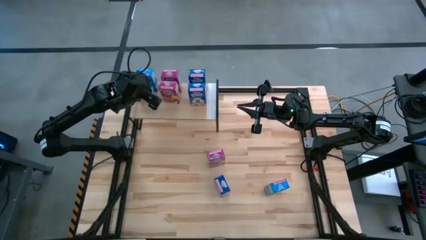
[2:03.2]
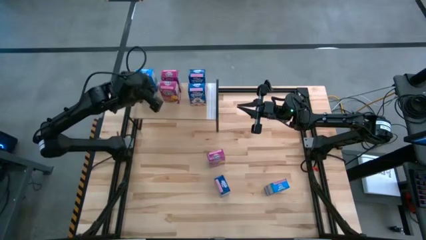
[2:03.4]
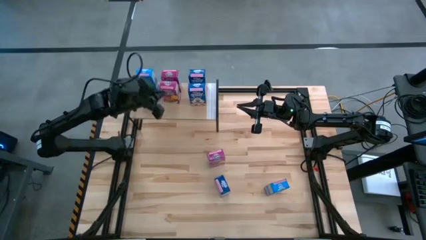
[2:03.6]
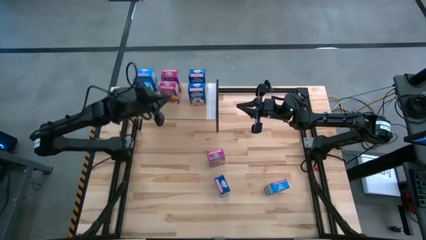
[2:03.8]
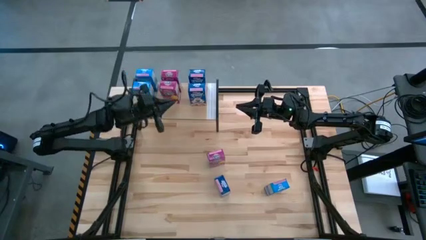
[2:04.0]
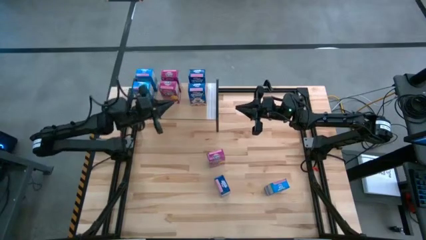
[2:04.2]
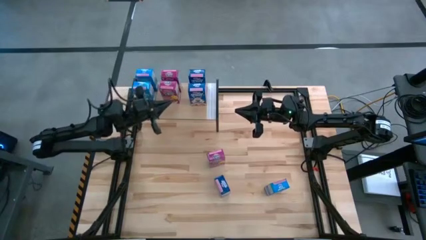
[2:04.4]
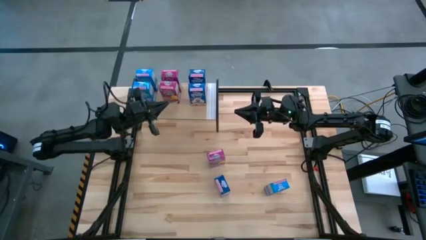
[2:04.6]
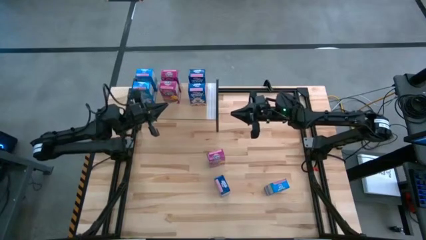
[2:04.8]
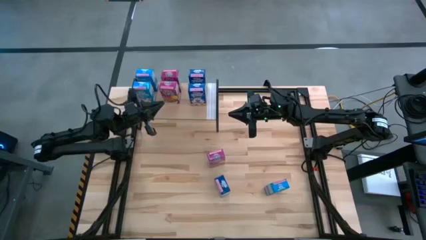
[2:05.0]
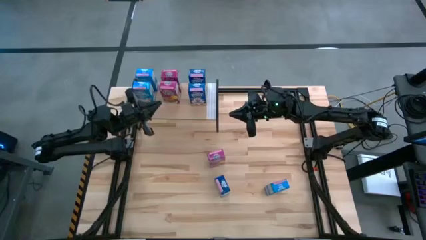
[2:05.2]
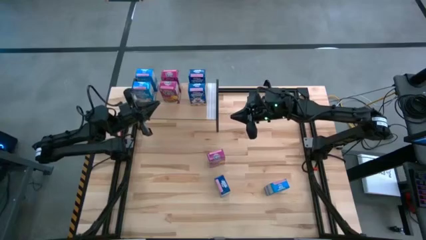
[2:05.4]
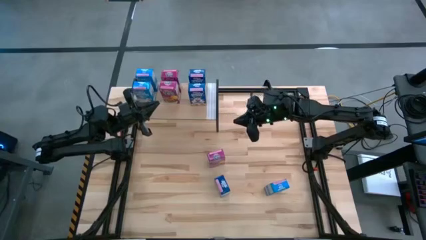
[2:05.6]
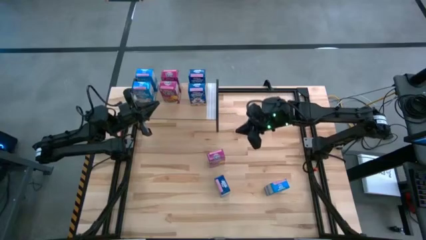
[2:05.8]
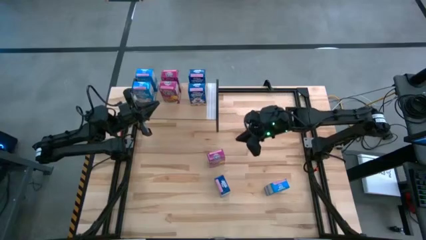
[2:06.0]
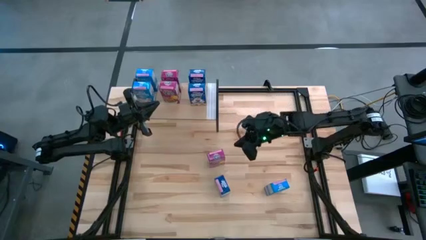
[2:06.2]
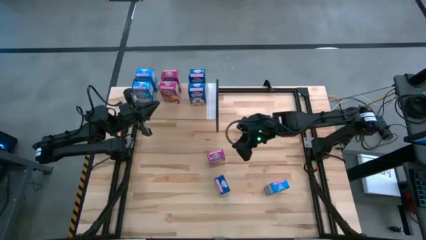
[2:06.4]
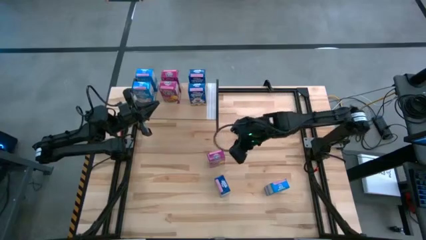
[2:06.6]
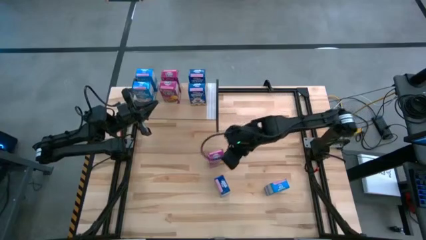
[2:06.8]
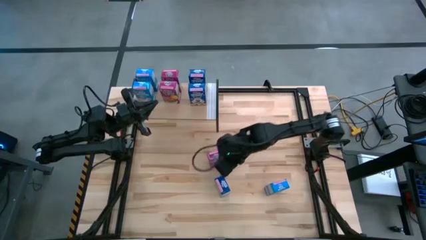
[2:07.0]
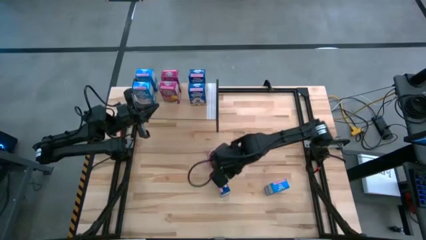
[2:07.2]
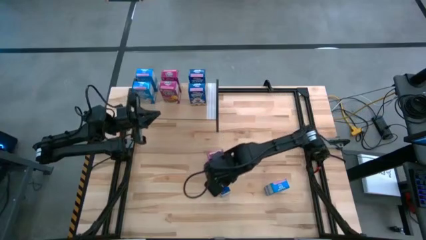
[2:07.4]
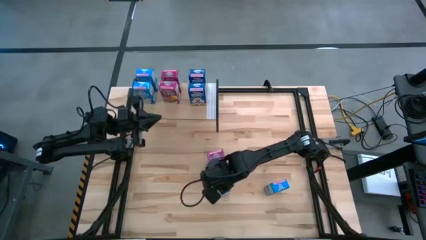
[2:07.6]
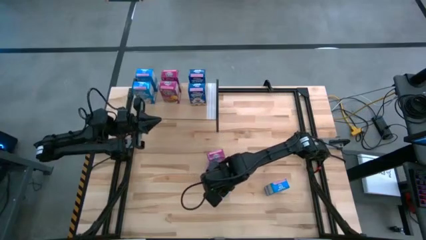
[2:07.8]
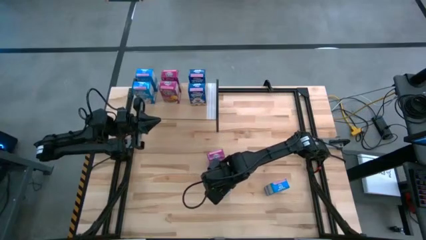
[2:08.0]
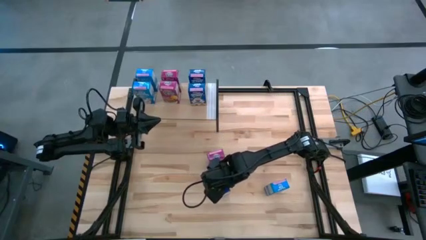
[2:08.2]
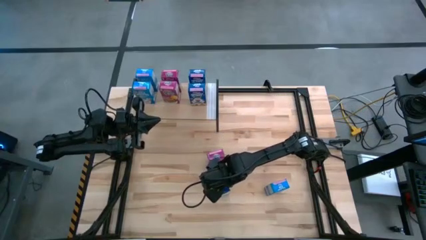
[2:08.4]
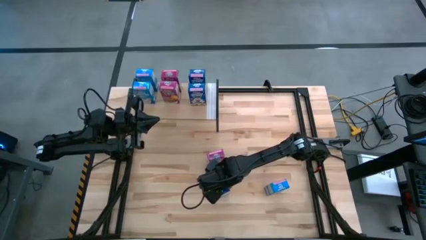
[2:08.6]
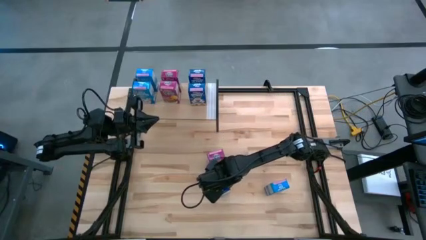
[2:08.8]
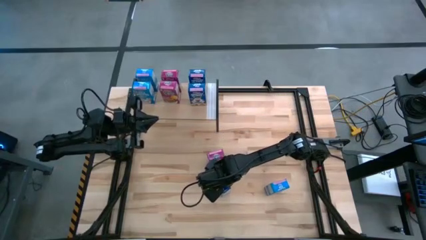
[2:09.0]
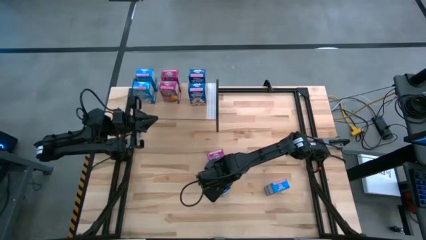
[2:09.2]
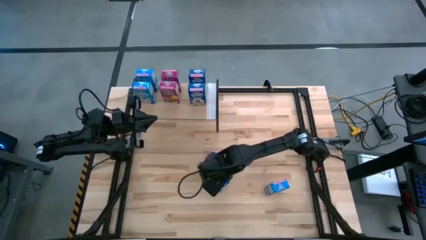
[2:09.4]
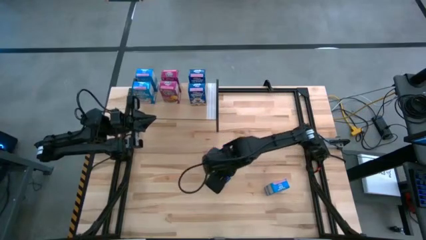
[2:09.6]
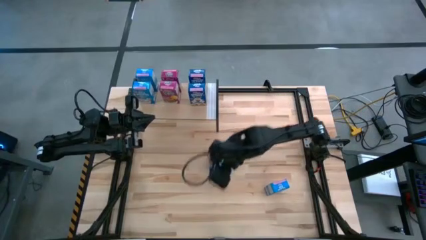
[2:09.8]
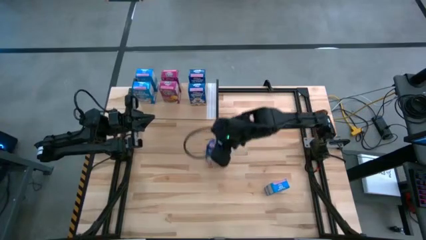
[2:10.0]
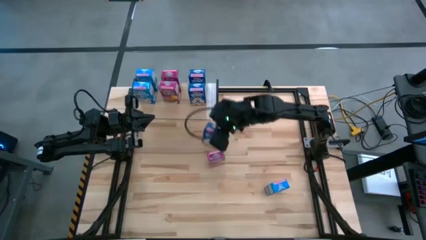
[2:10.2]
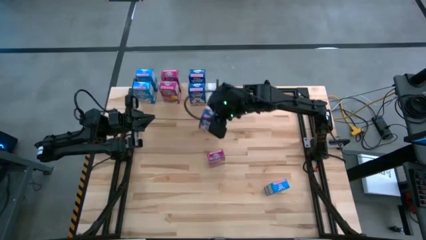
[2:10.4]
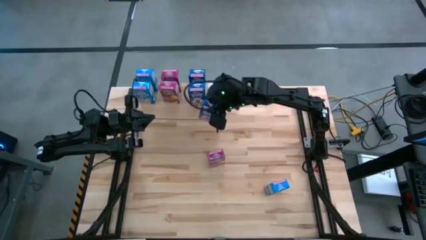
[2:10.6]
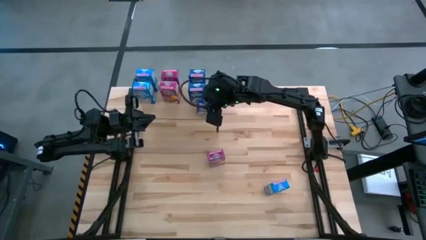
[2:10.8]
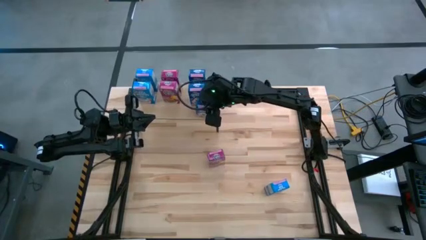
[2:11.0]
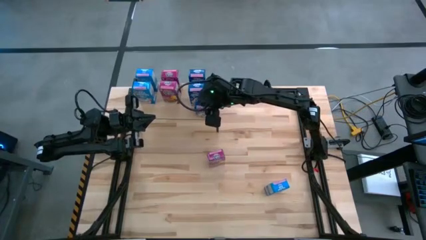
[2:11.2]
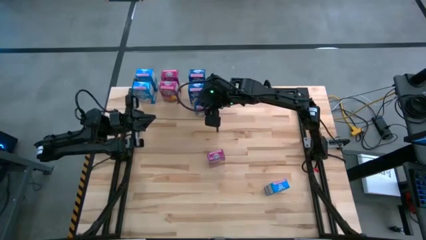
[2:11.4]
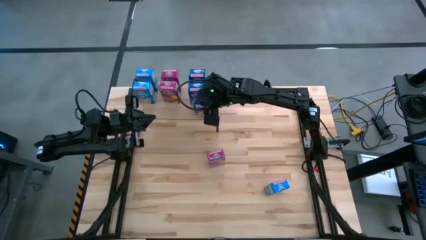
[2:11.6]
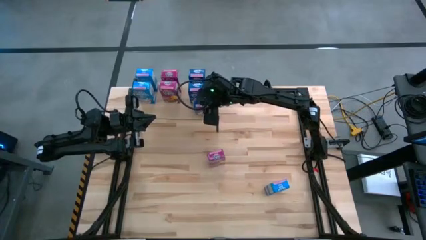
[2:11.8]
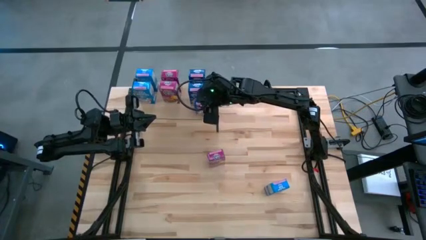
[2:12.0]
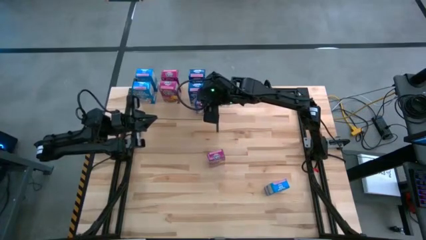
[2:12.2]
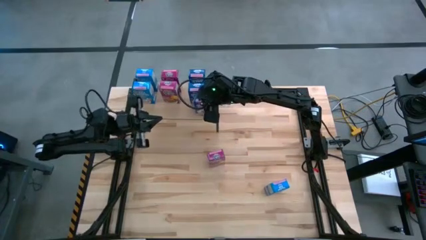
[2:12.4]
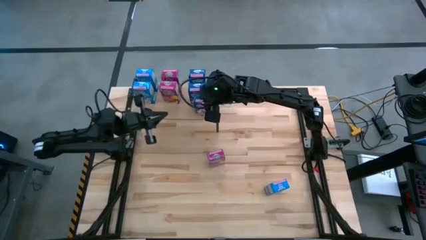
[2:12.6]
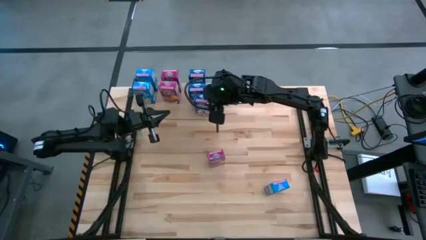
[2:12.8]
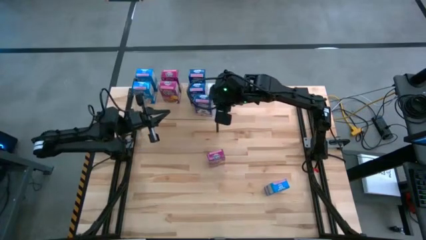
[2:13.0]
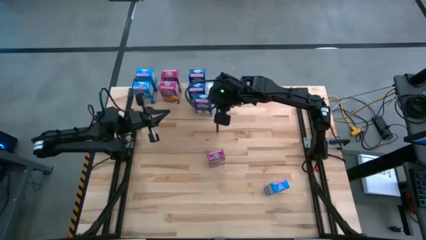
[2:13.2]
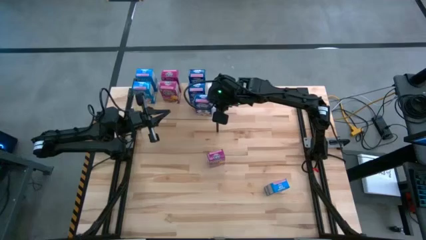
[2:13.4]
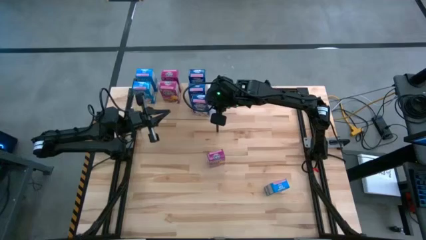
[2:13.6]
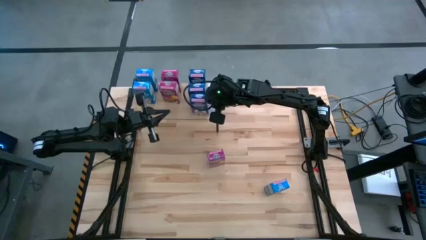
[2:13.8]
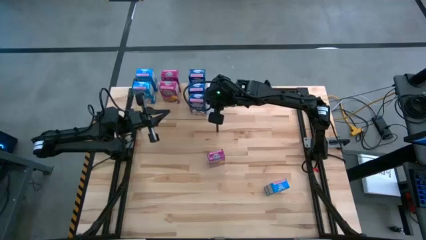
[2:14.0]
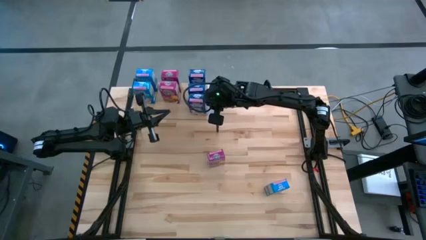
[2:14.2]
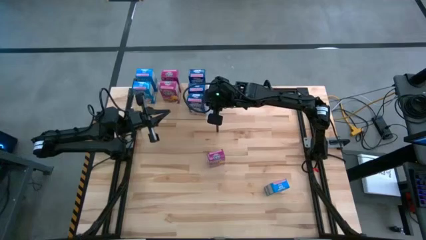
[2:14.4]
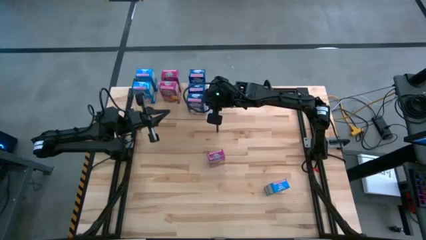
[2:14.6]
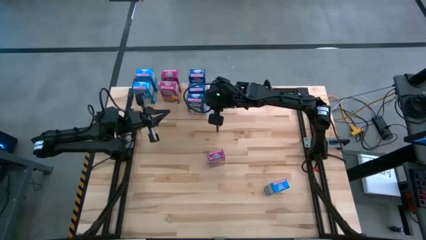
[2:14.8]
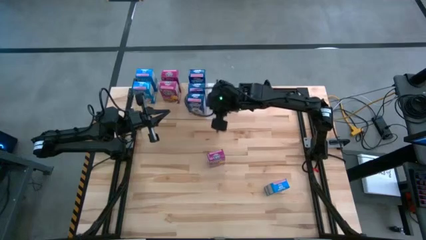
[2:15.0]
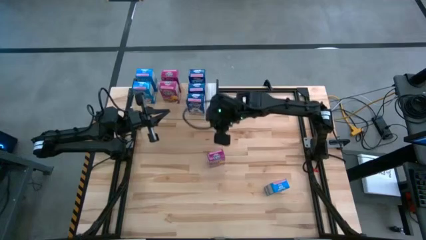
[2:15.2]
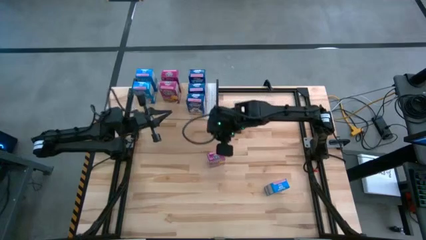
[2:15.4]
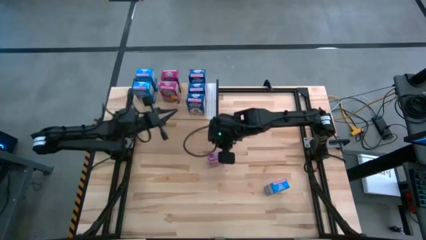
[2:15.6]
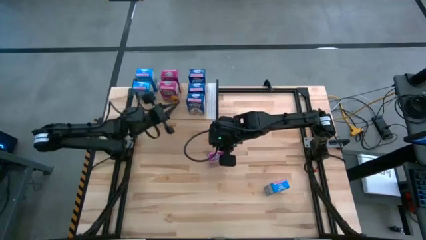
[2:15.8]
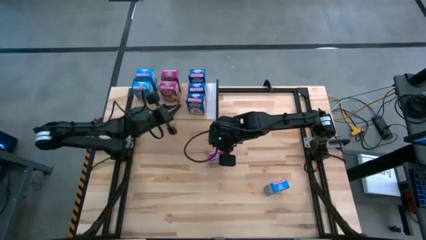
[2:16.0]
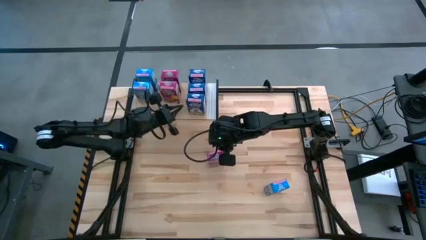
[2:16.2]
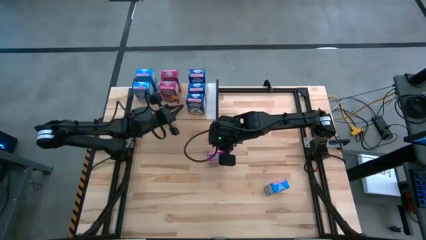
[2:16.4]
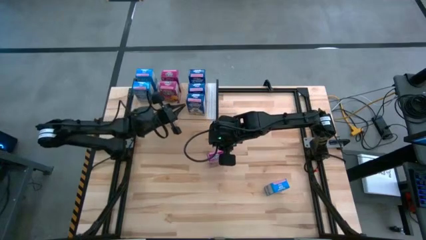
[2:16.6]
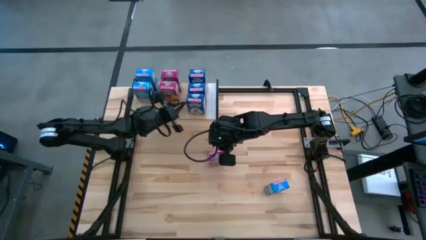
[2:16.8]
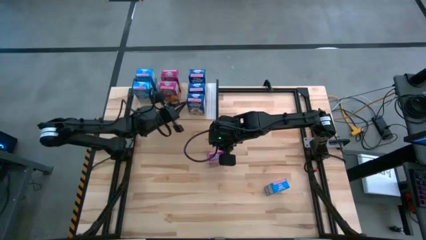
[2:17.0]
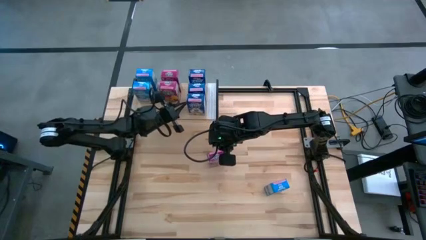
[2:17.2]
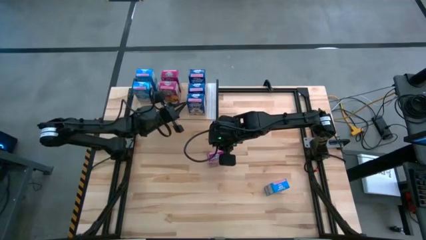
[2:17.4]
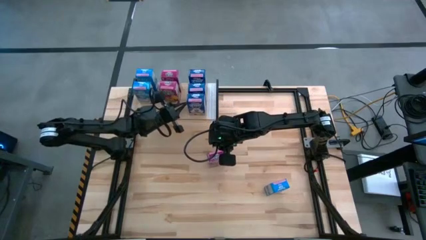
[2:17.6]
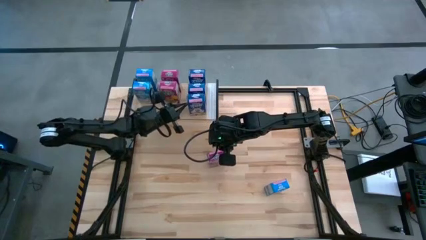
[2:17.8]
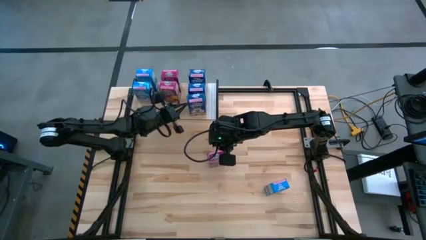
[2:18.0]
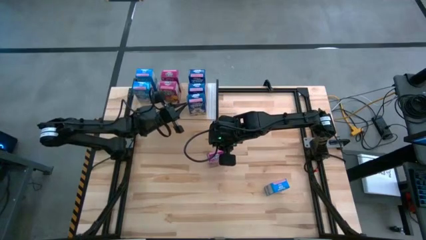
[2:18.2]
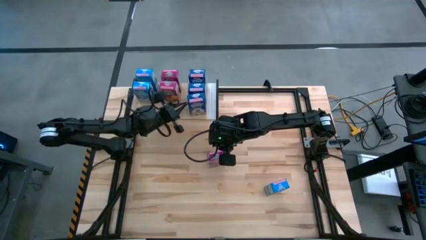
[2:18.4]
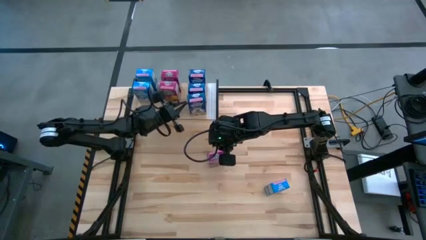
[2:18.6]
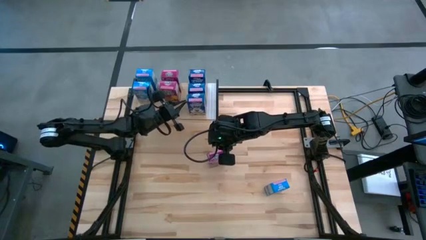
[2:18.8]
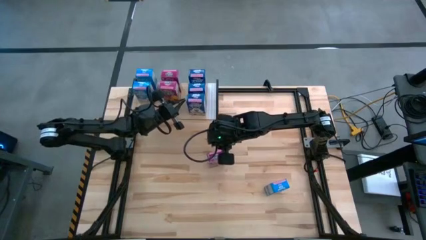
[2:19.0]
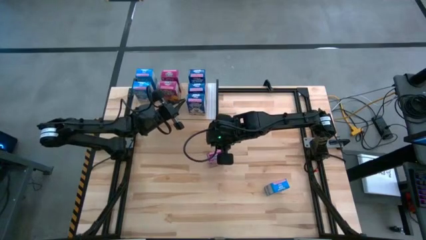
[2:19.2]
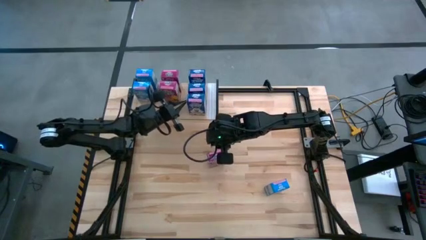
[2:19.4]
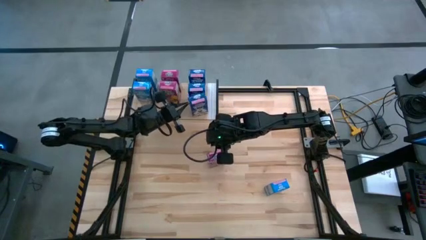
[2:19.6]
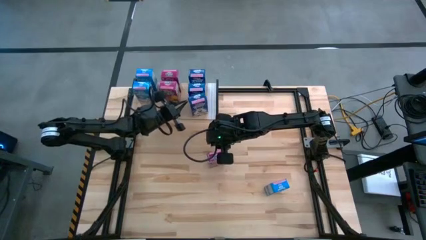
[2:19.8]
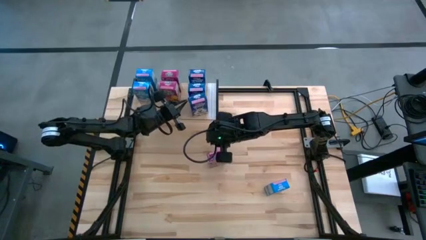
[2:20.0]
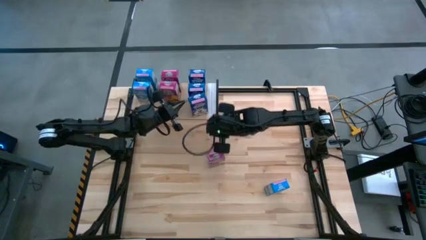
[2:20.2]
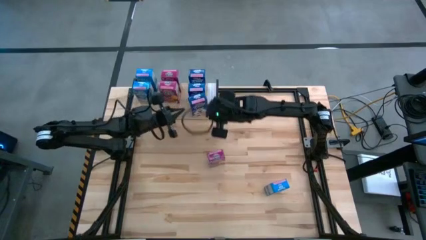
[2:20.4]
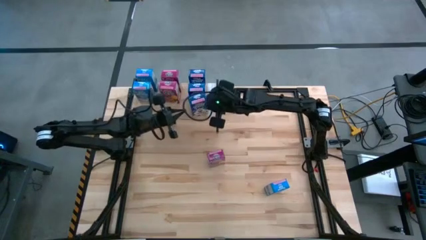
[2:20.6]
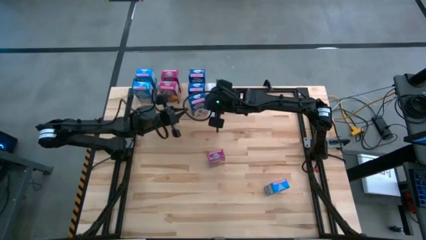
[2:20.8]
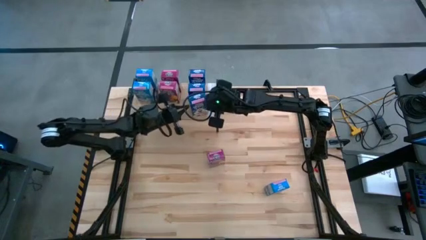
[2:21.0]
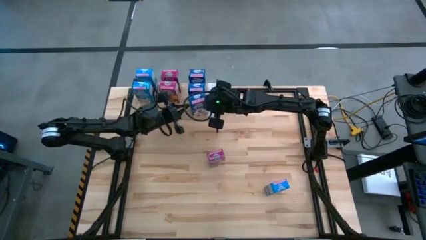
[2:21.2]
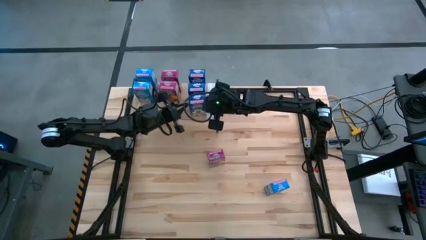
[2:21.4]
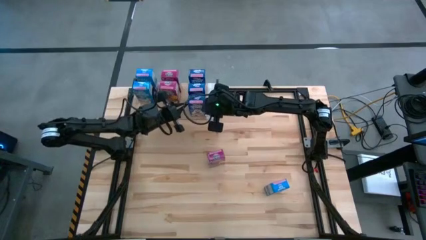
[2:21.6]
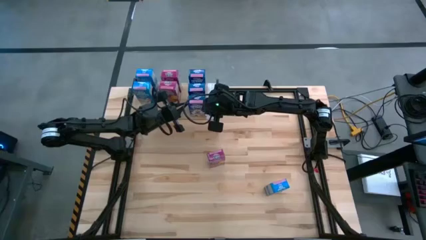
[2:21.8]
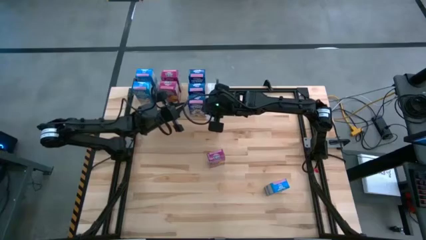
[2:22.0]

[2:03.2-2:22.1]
Task: Stack cereal on shelf
Put the blue cereal box on the shelf
